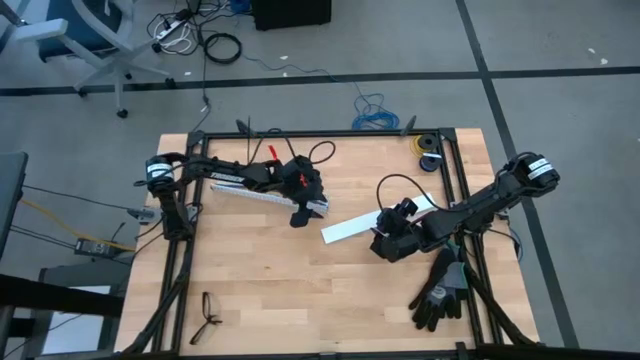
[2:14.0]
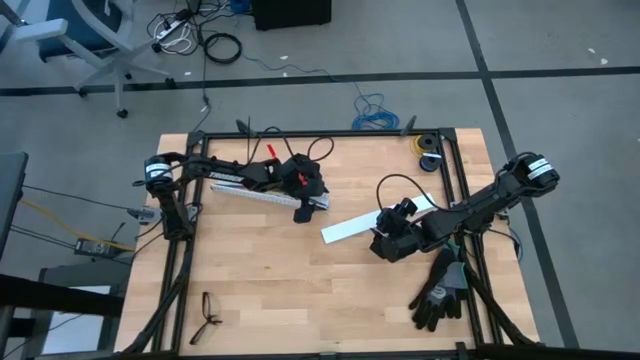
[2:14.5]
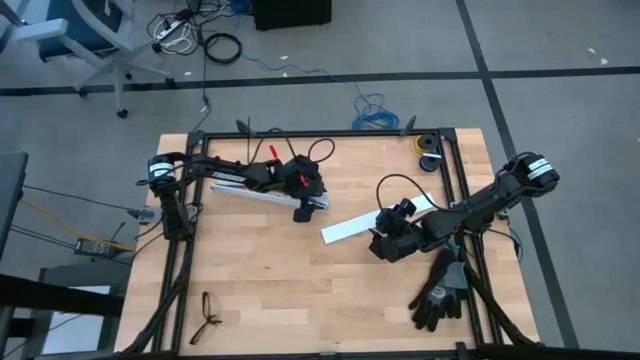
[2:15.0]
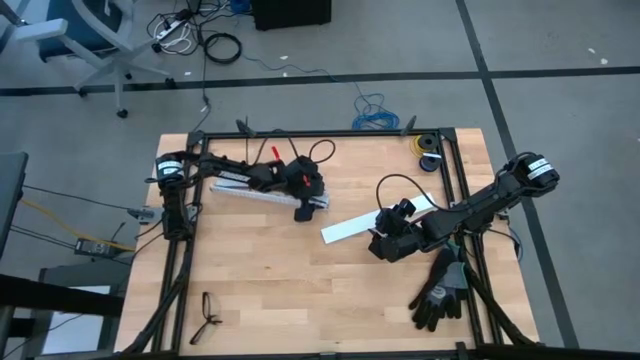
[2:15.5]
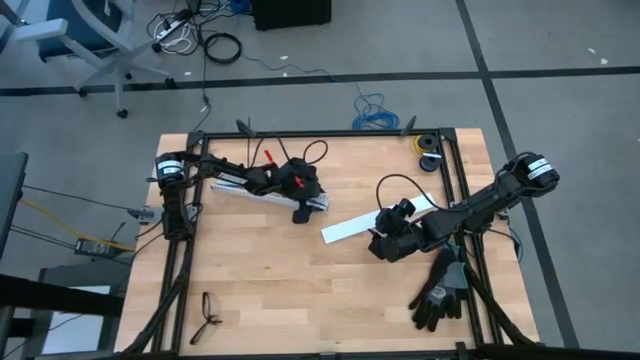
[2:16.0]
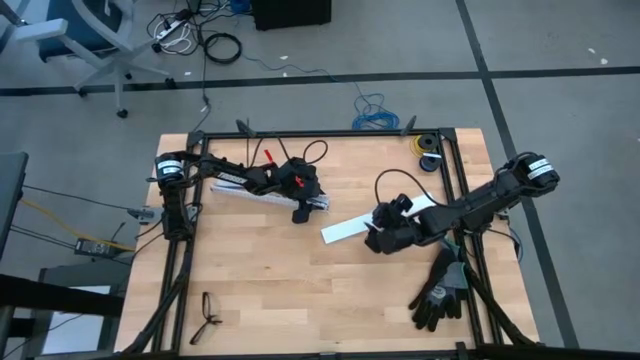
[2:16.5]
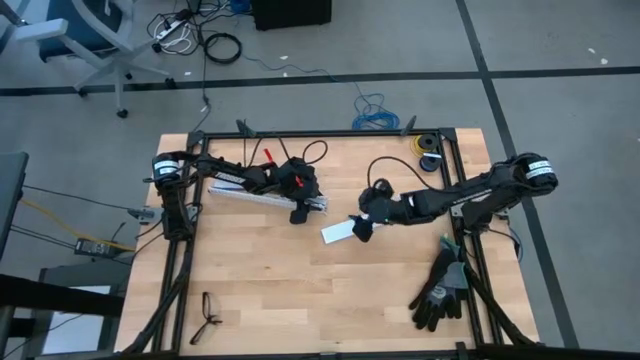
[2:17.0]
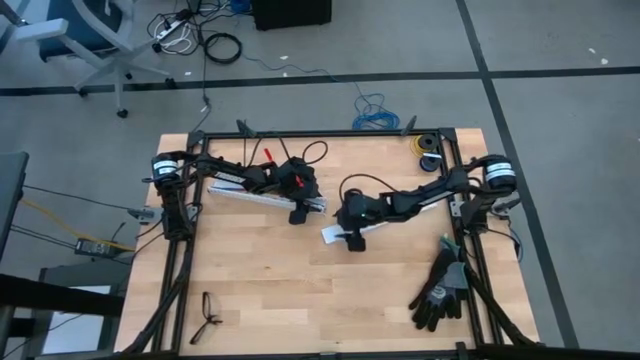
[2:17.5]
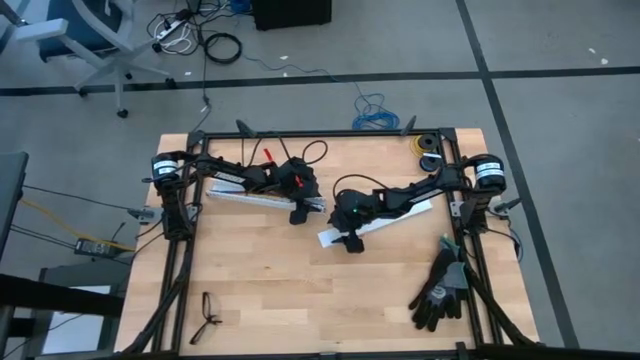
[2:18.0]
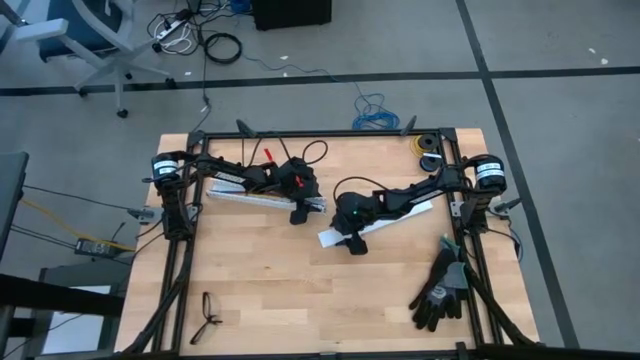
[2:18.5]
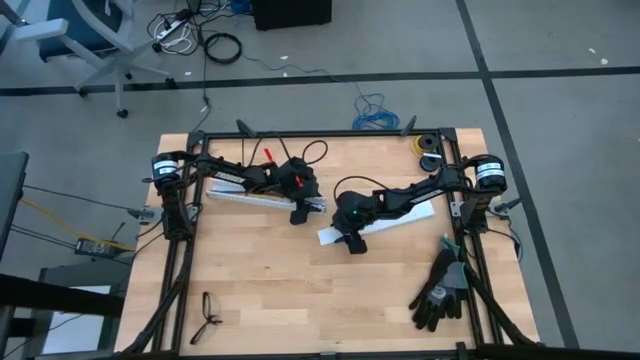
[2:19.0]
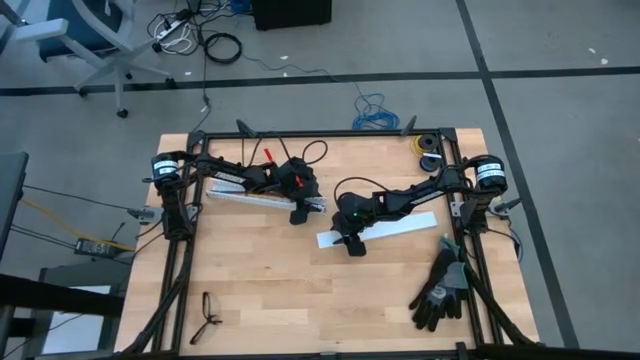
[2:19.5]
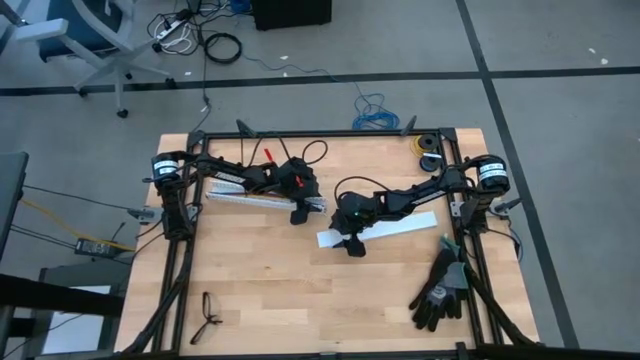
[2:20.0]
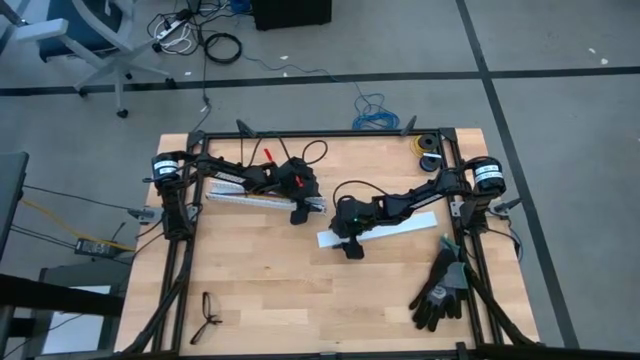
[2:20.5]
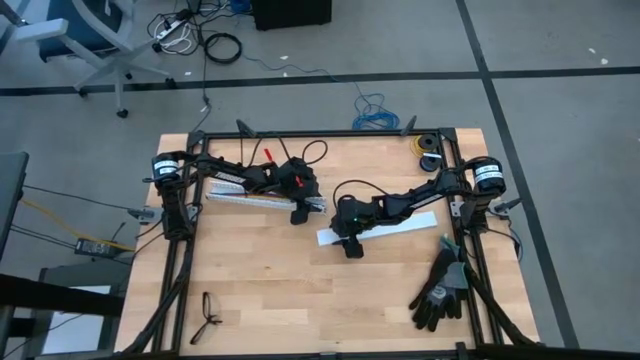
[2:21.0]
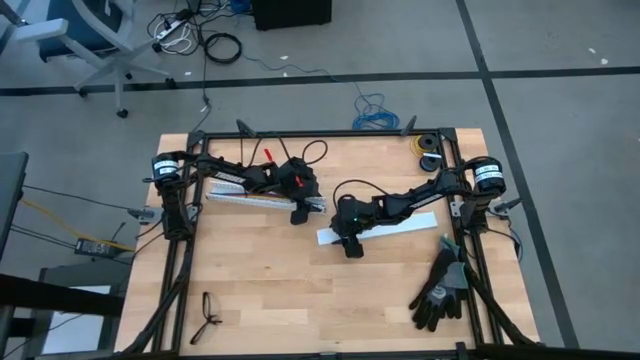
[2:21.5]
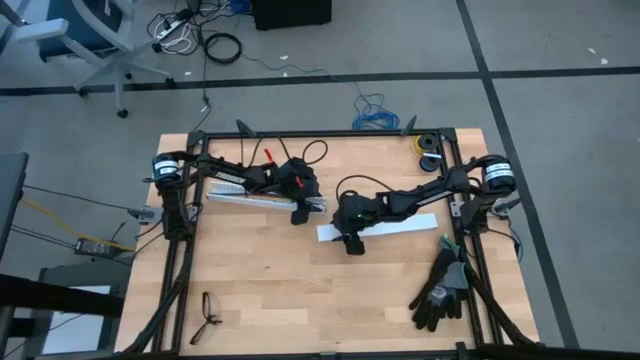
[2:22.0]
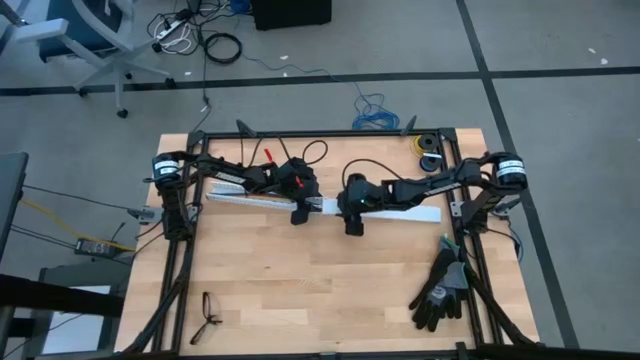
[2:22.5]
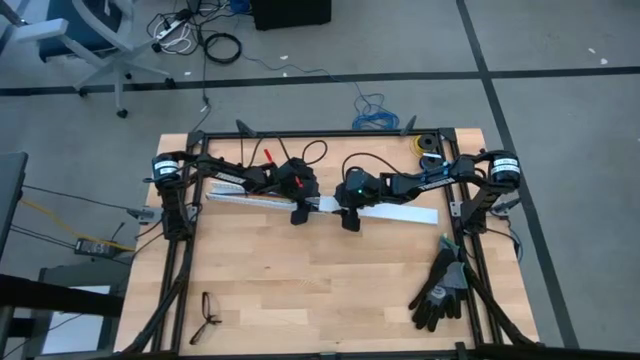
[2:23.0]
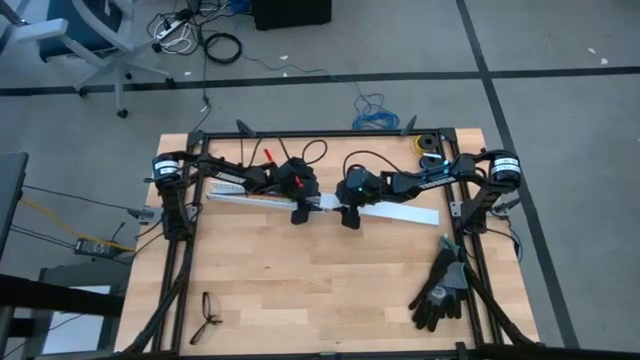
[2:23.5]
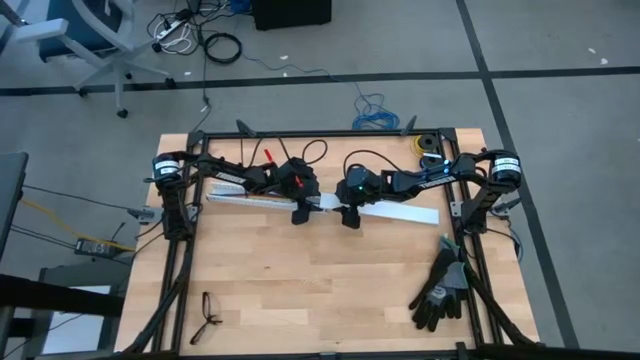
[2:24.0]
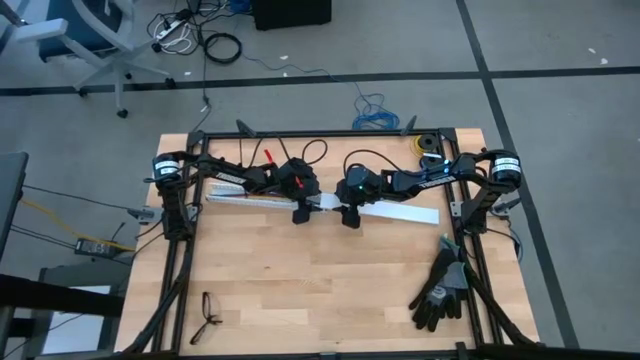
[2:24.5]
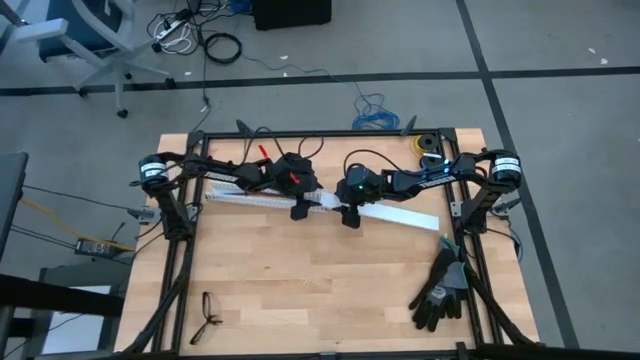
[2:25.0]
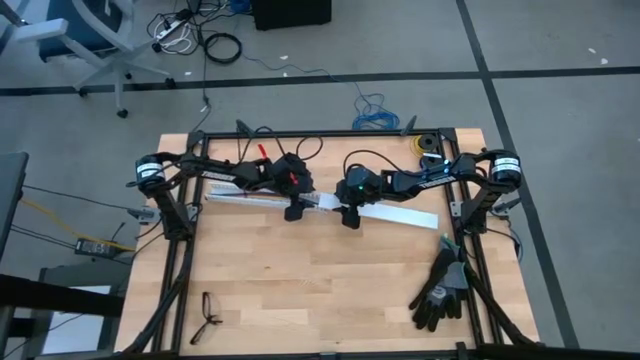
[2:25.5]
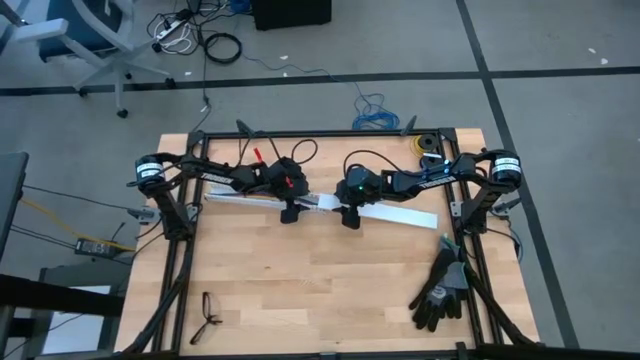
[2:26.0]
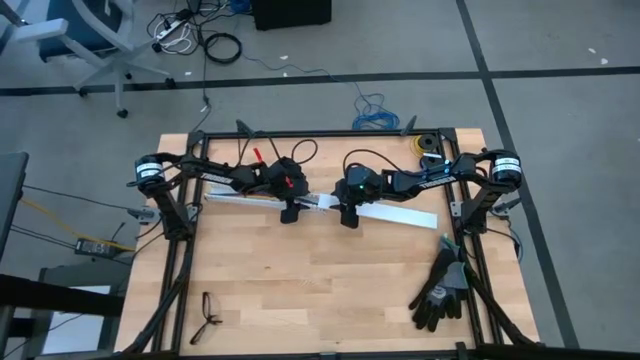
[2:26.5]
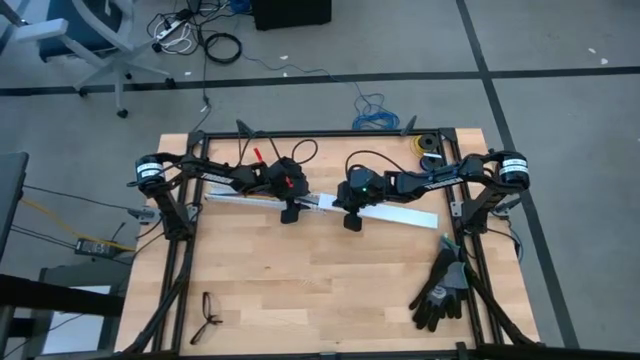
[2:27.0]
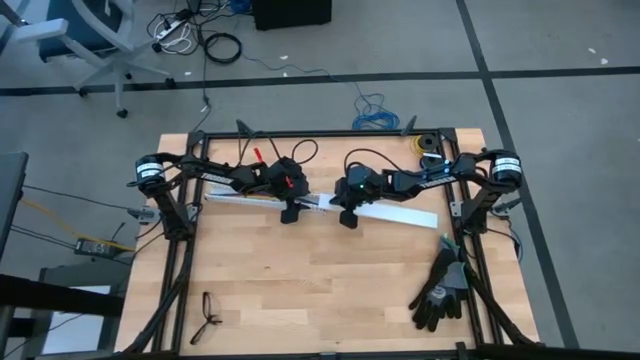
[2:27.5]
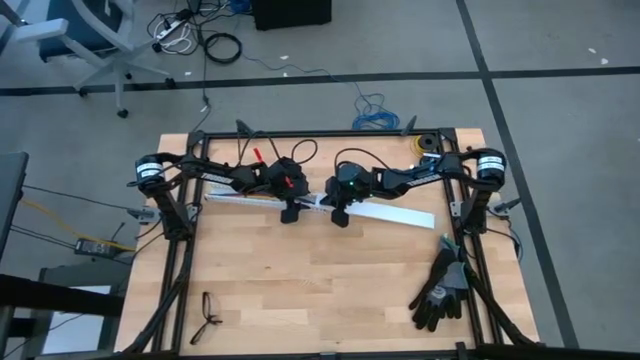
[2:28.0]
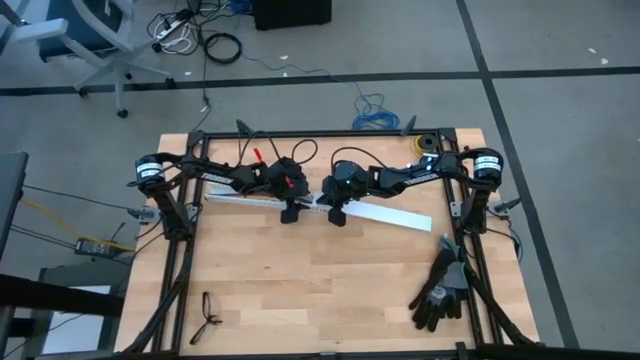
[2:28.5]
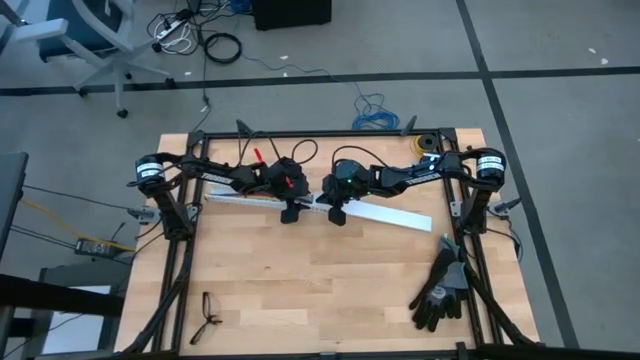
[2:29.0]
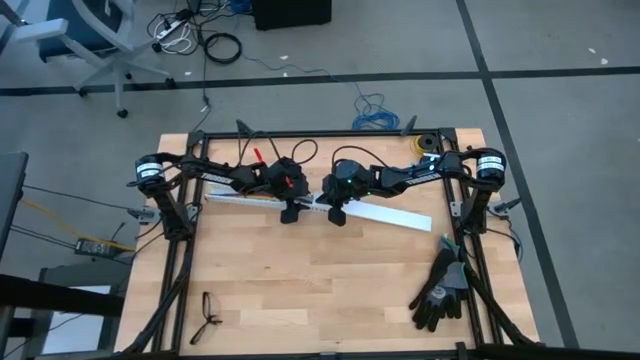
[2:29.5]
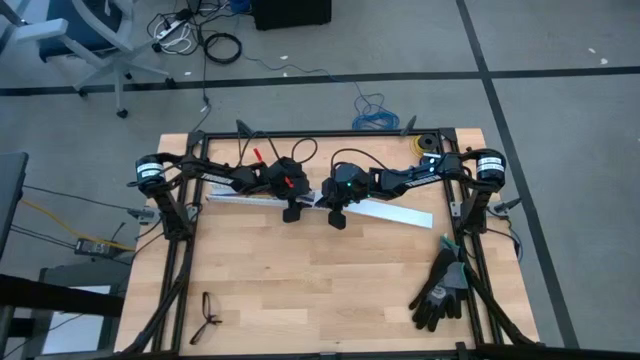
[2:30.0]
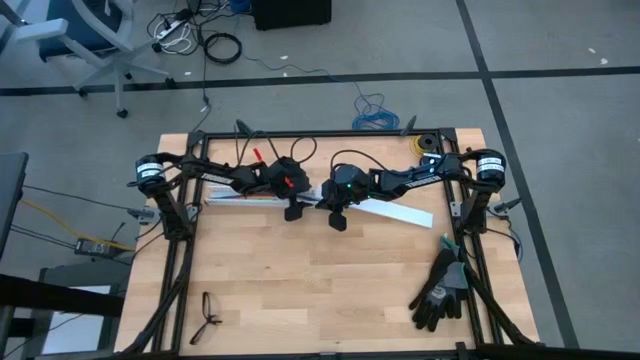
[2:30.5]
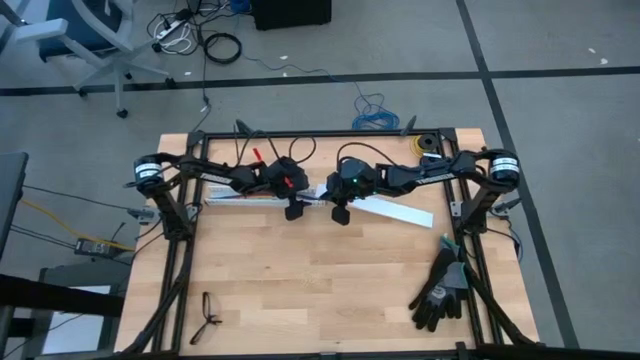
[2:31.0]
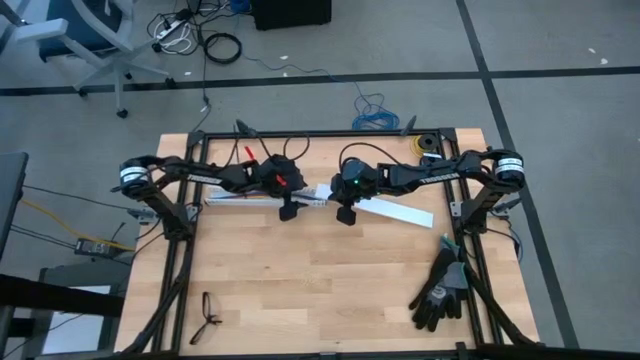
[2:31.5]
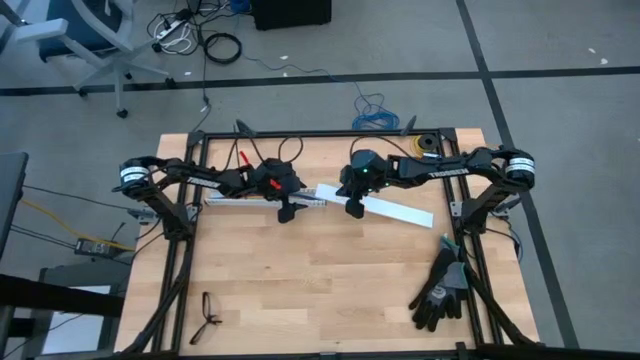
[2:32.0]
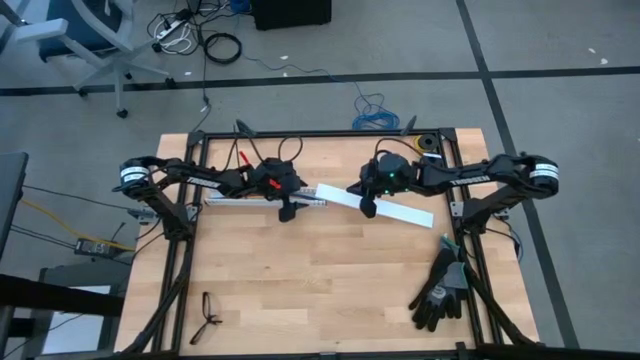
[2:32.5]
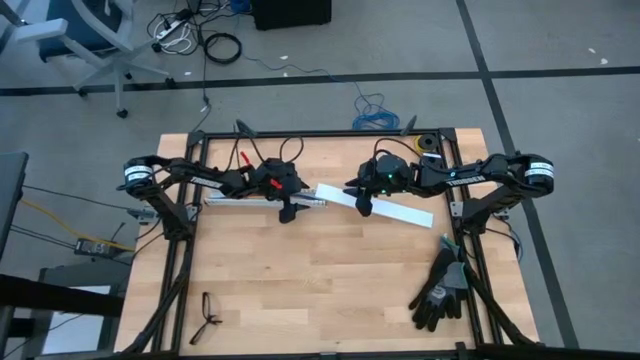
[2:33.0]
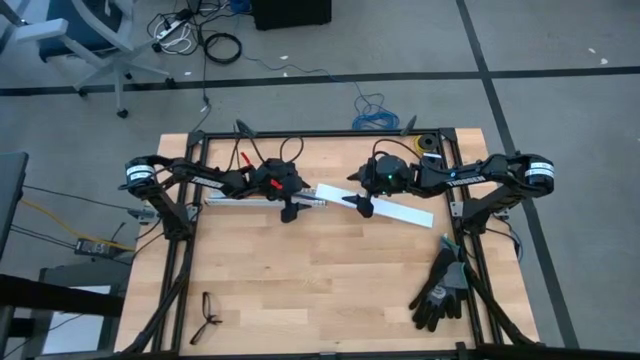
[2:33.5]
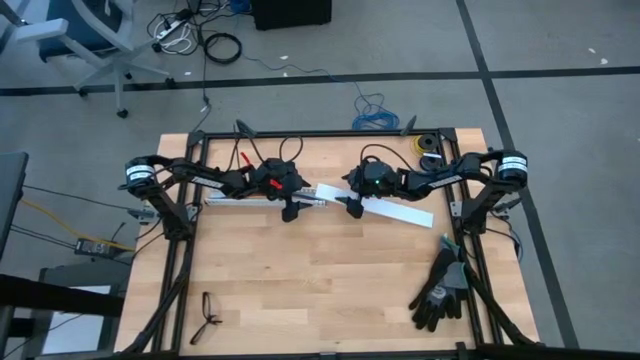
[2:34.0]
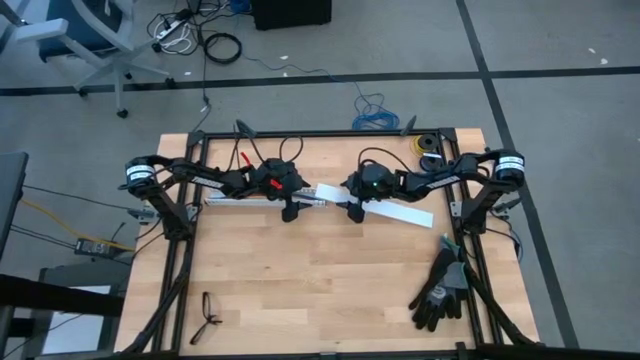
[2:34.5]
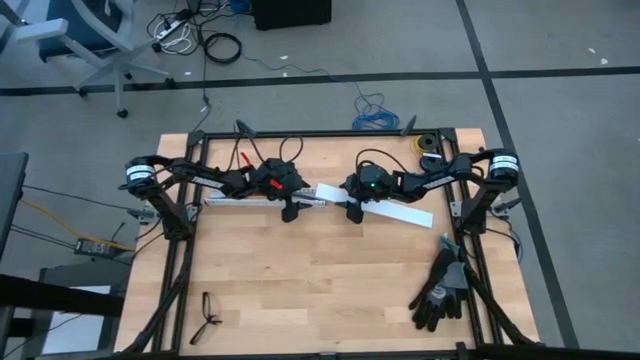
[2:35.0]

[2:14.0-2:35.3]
Task: Ziptie cables
Close the white cable duct with the white cable duct cover
